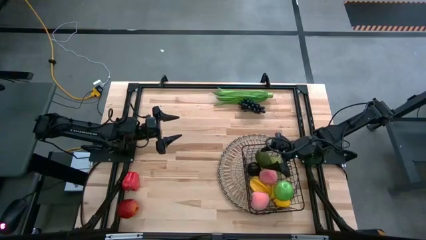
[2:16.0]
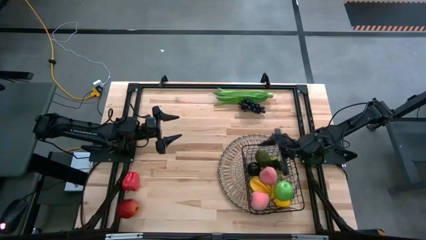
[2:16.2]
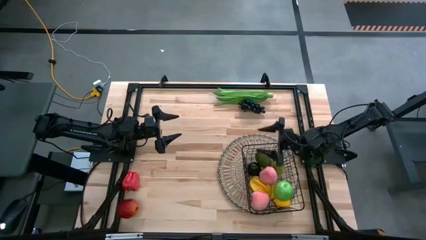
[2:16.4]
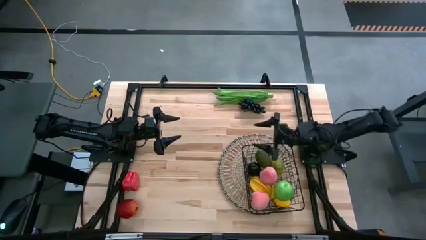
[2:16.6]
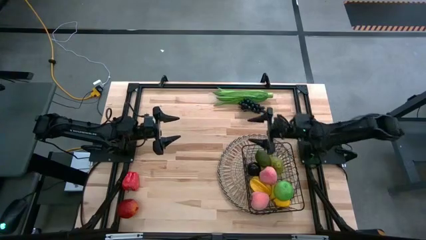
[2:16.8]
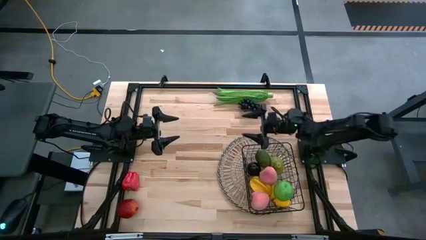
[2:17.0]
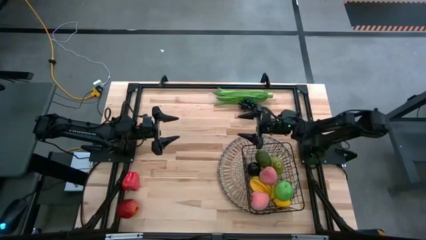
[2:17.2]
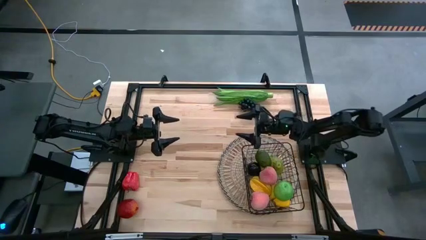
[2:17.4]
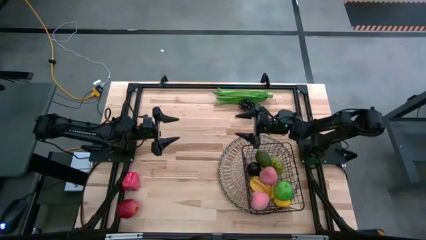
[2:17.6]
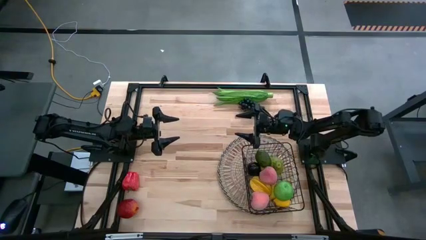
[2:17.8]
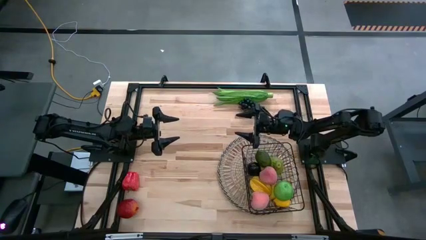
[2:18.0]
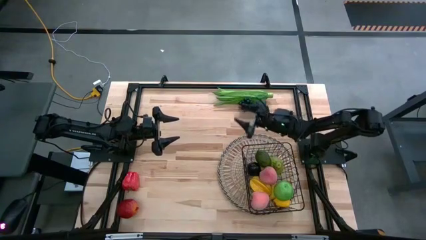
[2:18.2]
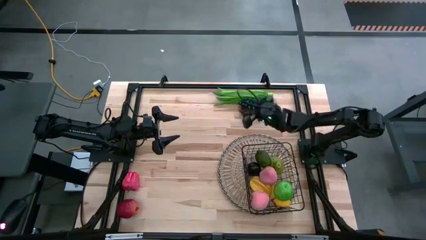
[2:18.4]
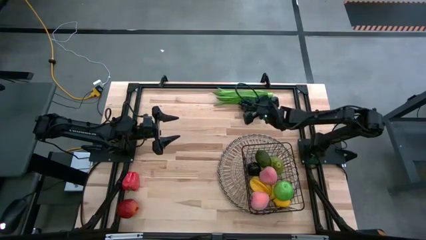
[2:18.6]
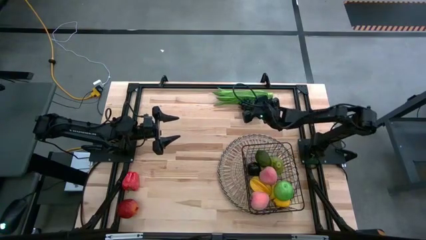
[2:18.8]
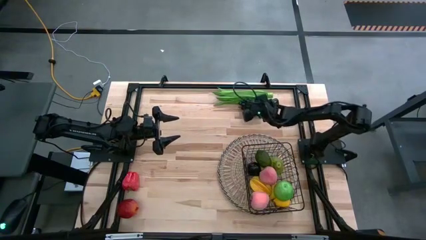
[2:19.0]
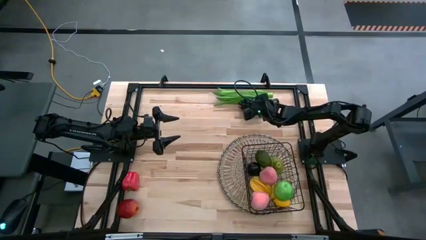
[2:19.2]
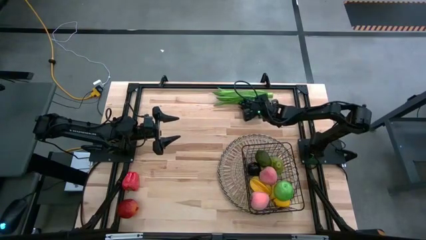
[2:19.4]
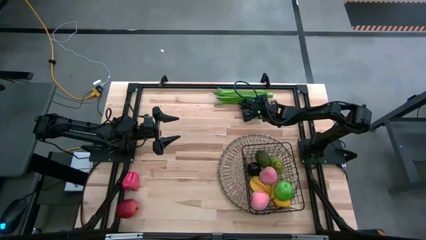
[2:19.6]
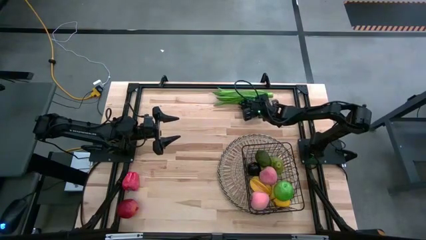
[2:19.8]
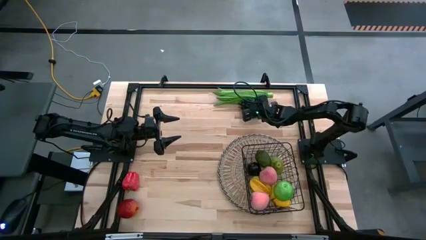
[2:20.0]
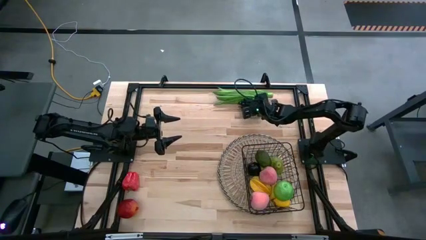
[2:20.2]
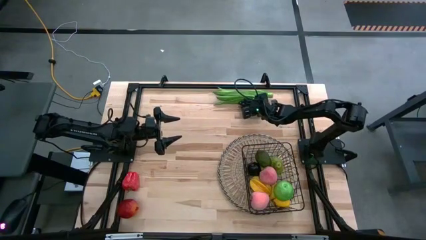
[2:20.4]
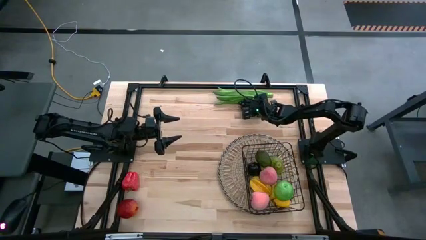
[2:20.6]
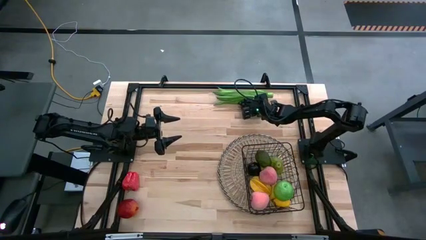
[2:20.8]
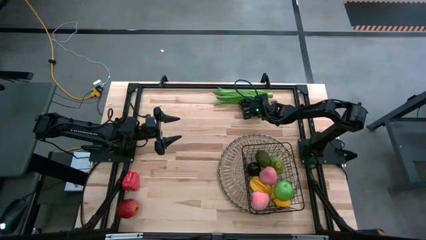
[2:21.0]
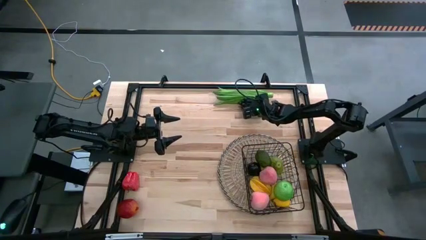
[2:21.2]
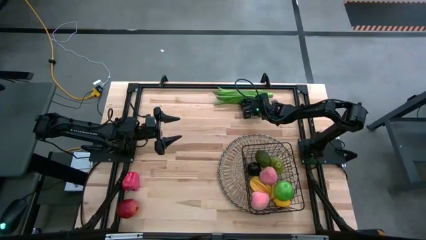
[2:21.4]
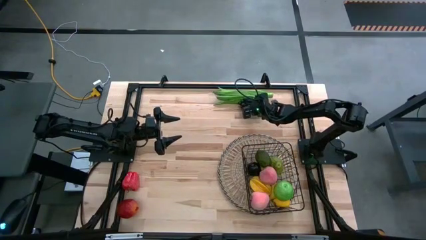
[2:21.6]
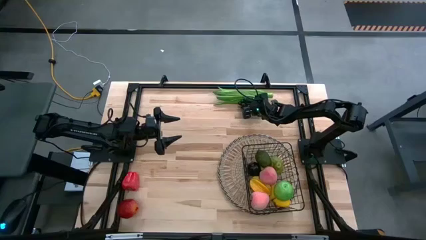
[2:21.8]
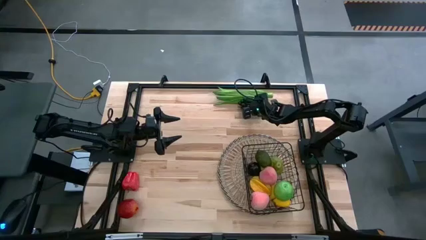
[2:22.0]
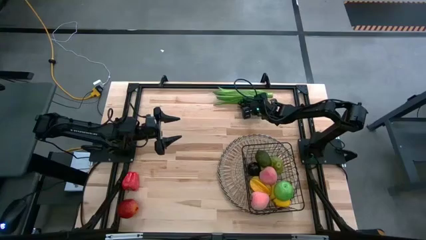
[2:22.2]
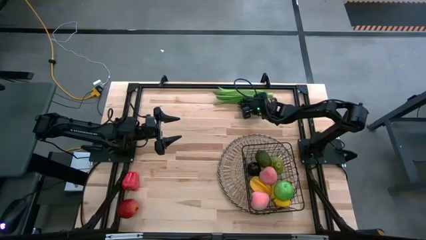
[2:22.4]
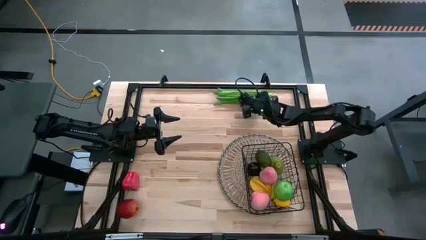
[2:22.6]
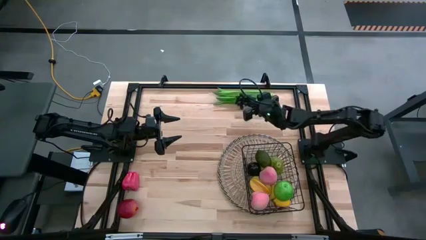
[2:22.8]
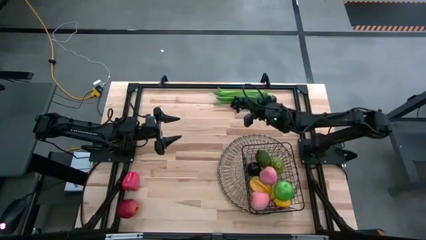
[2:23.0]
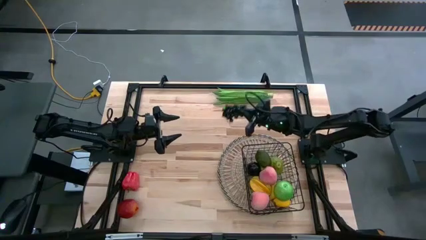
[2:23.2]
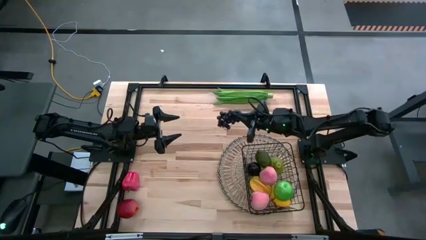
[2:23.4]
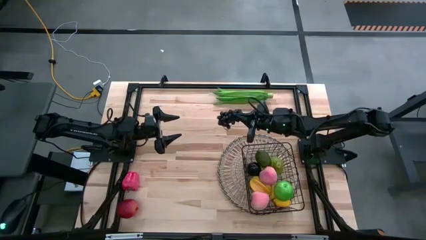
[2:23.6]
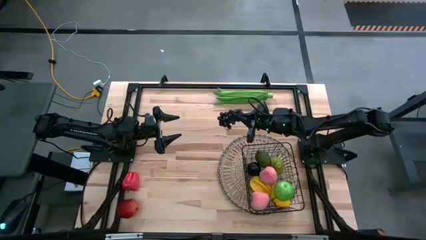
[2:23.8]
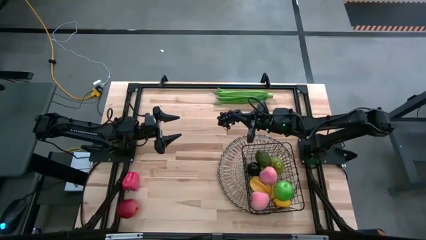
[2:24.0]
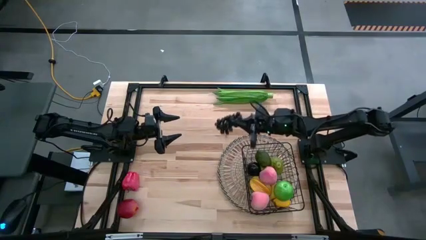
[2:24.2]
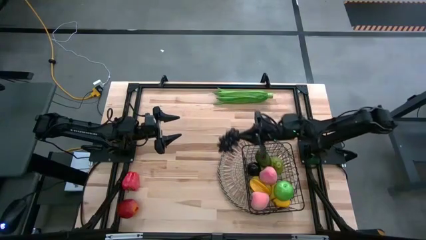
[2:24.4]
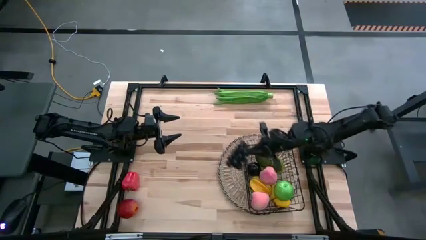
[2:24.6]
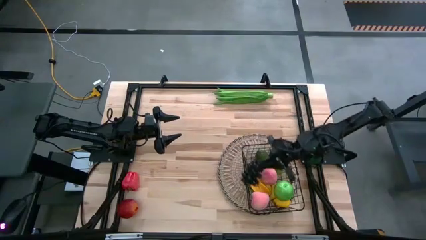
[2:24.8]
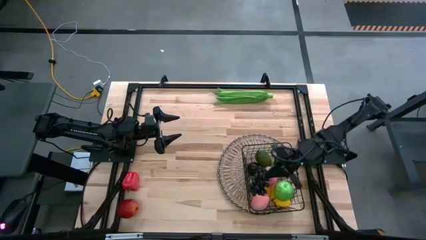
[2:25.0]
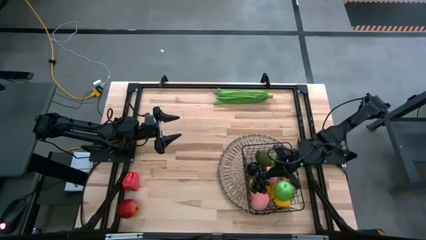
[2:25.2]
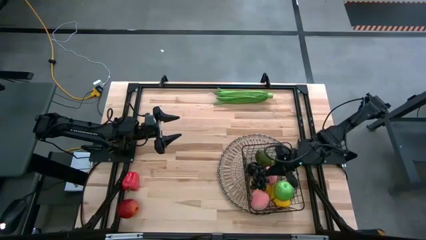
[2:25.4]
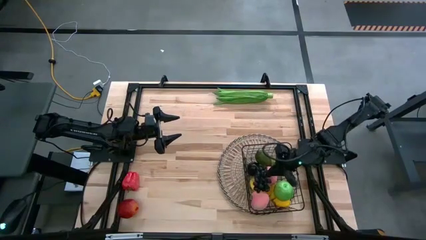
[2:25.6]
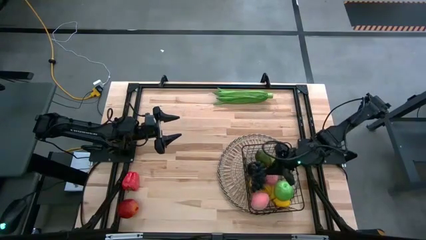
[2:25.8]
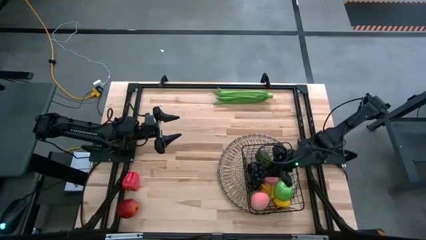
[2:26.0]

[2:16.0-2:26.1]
Task: Build produce basket
Put the grapes into the wire basket
